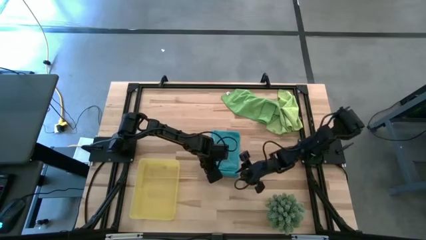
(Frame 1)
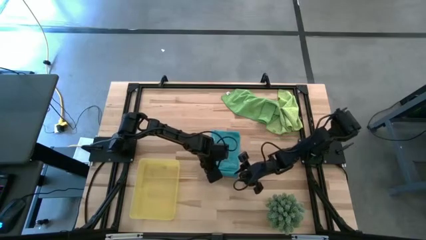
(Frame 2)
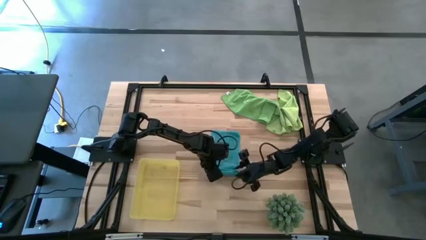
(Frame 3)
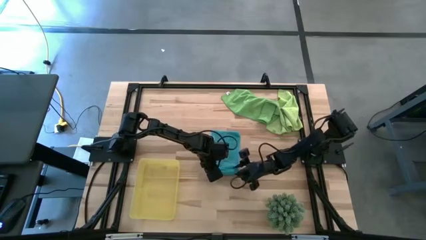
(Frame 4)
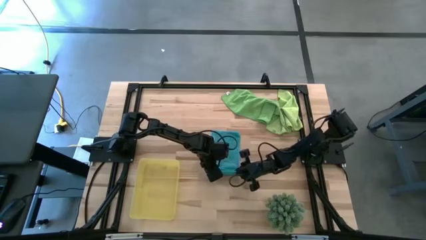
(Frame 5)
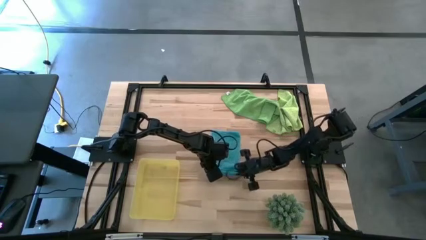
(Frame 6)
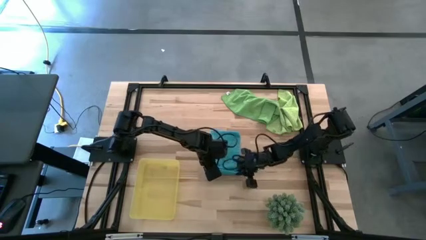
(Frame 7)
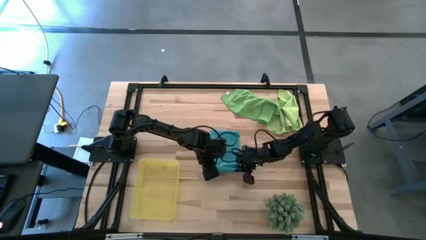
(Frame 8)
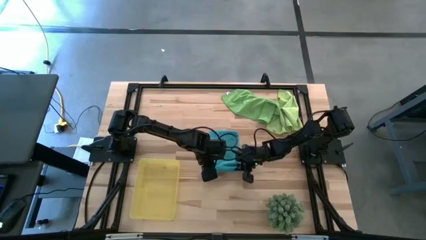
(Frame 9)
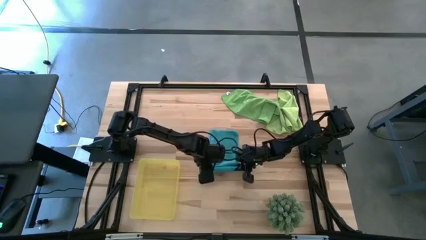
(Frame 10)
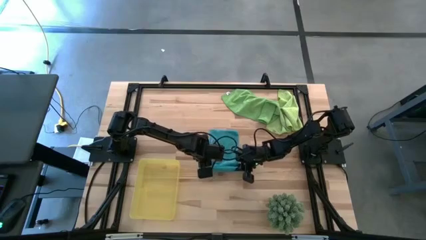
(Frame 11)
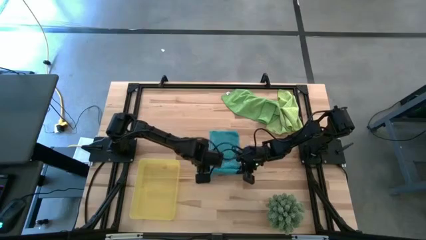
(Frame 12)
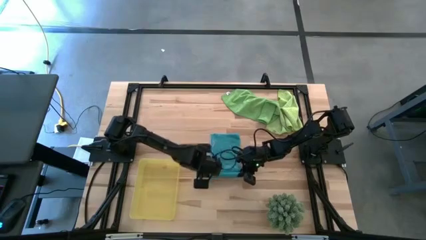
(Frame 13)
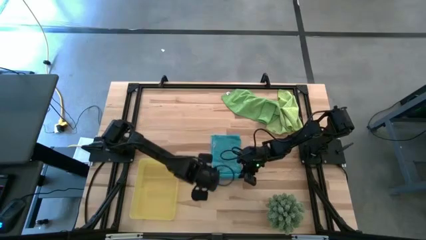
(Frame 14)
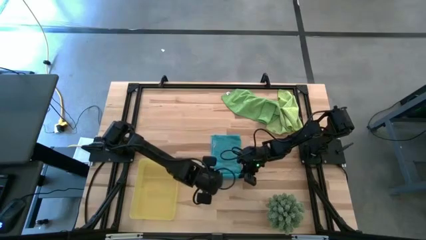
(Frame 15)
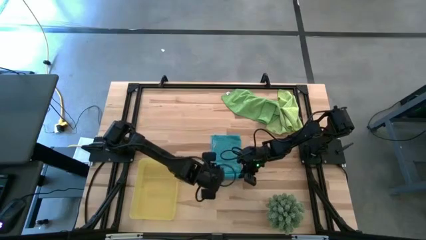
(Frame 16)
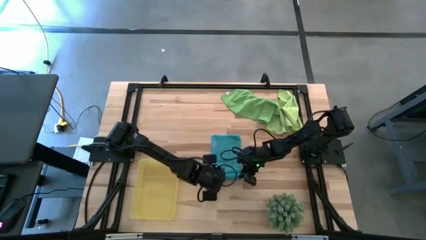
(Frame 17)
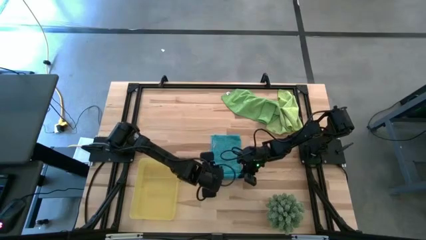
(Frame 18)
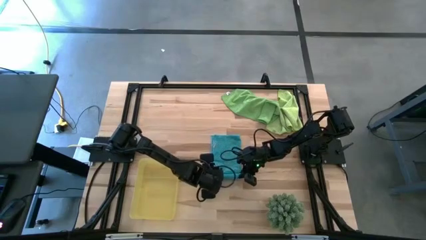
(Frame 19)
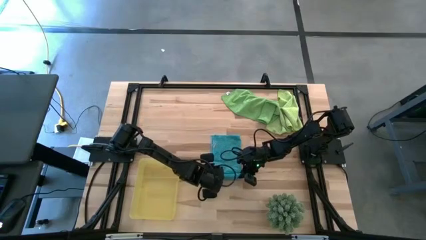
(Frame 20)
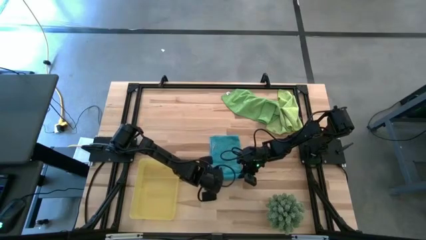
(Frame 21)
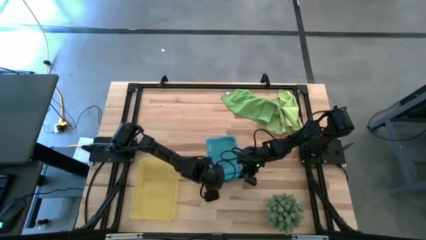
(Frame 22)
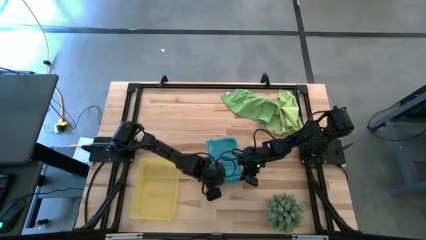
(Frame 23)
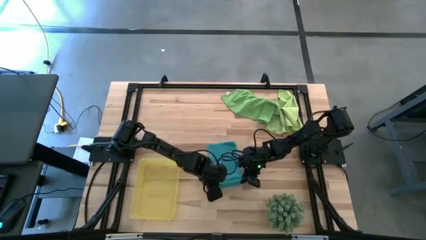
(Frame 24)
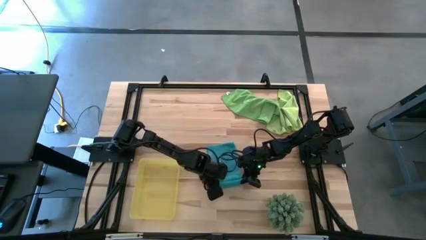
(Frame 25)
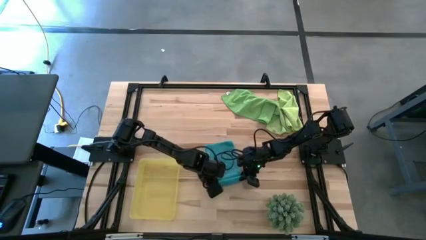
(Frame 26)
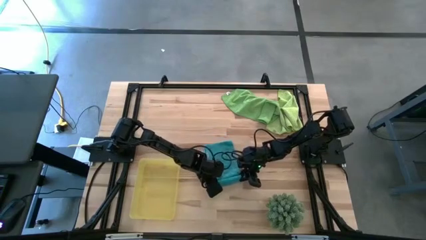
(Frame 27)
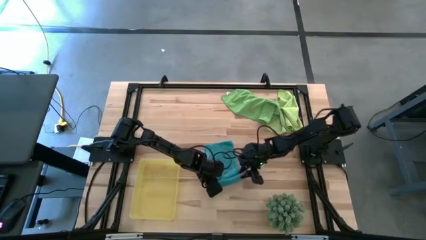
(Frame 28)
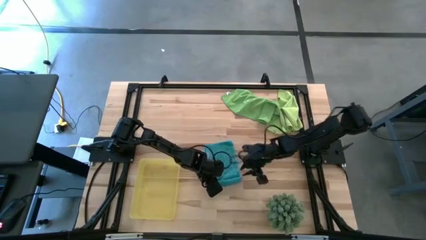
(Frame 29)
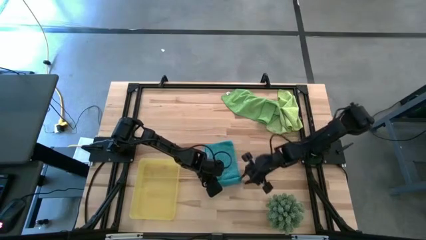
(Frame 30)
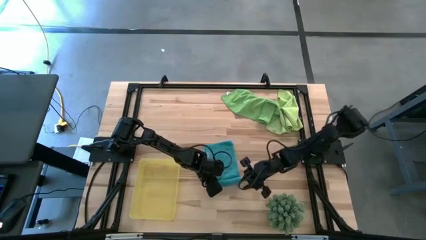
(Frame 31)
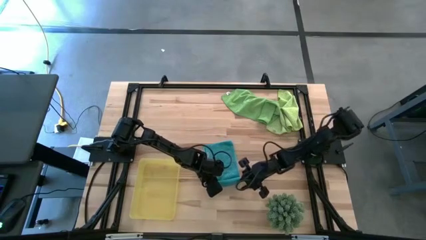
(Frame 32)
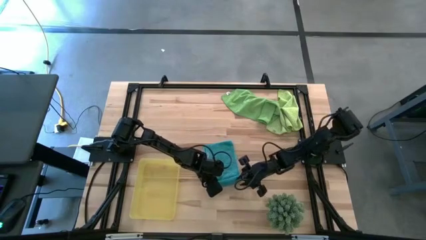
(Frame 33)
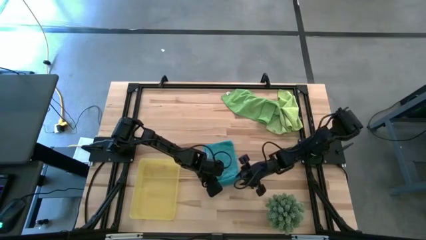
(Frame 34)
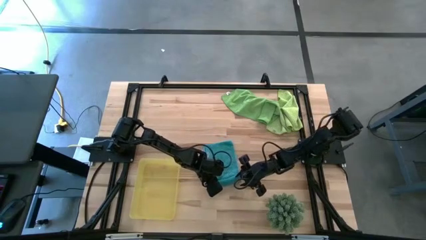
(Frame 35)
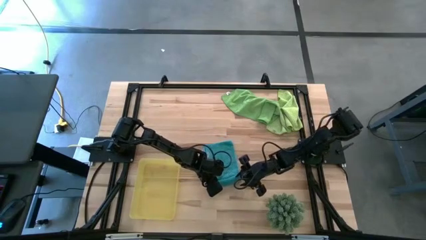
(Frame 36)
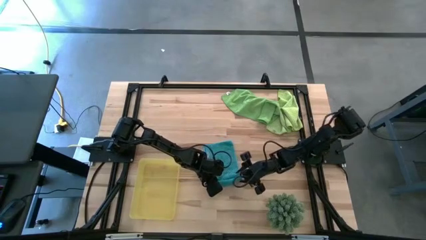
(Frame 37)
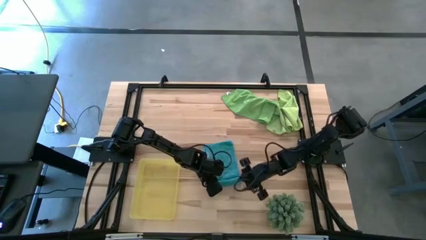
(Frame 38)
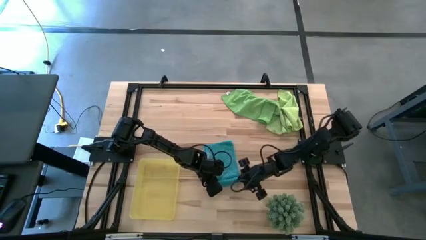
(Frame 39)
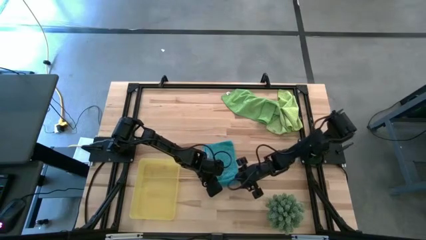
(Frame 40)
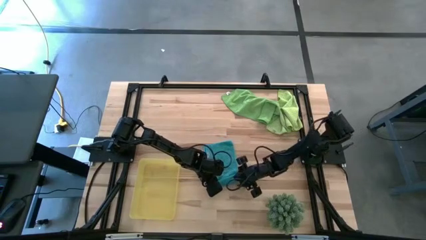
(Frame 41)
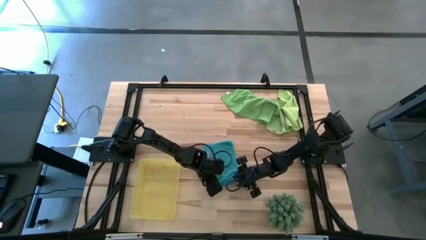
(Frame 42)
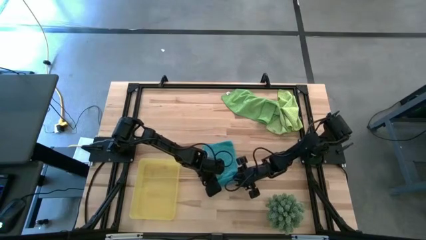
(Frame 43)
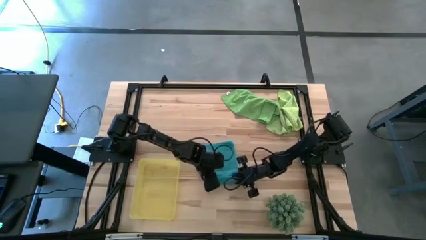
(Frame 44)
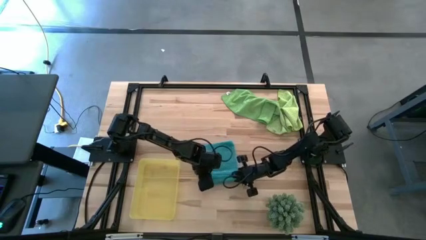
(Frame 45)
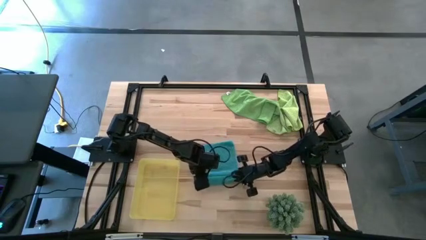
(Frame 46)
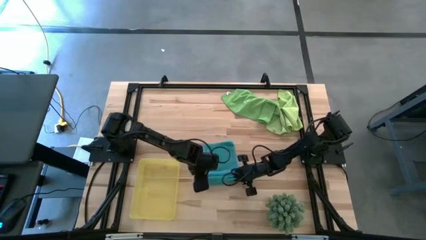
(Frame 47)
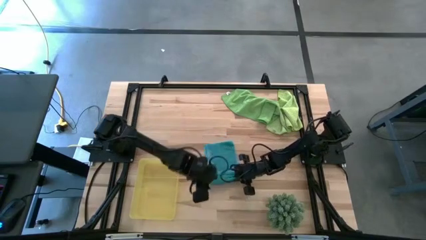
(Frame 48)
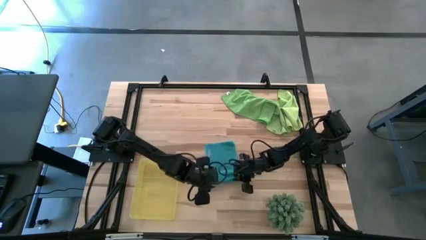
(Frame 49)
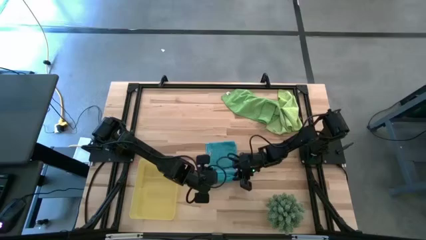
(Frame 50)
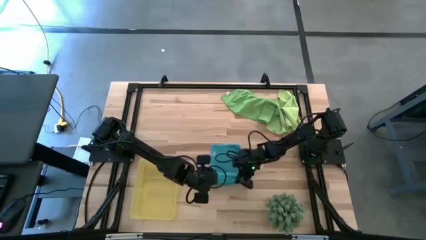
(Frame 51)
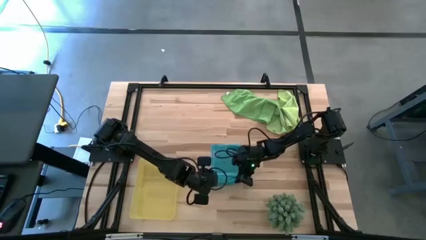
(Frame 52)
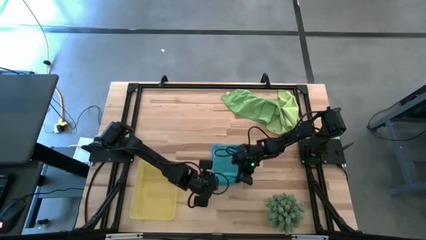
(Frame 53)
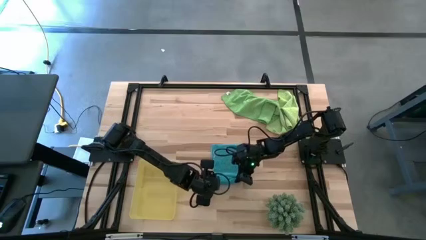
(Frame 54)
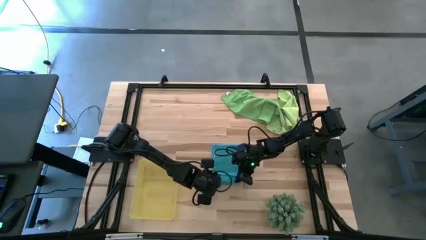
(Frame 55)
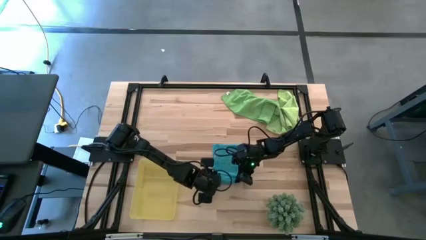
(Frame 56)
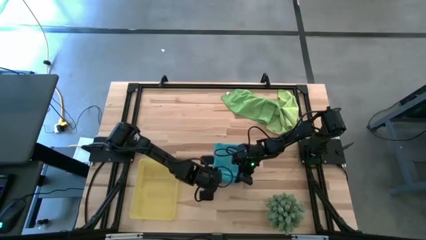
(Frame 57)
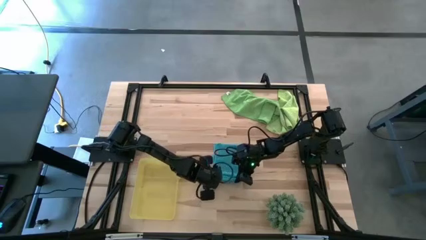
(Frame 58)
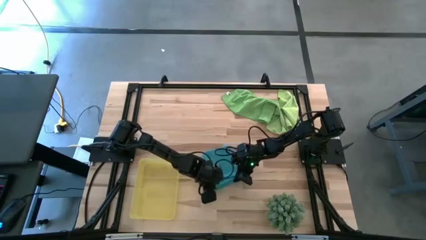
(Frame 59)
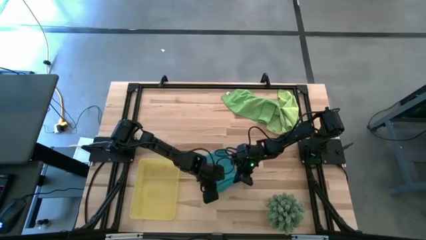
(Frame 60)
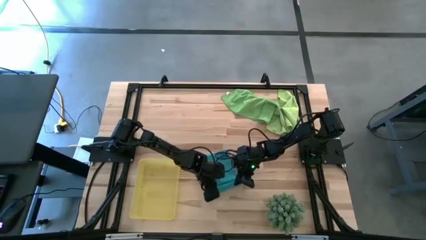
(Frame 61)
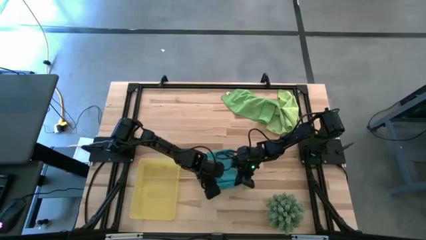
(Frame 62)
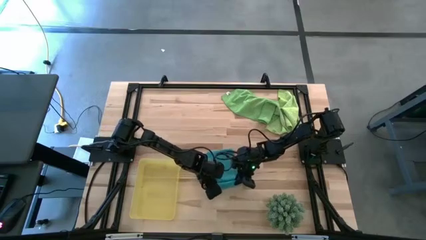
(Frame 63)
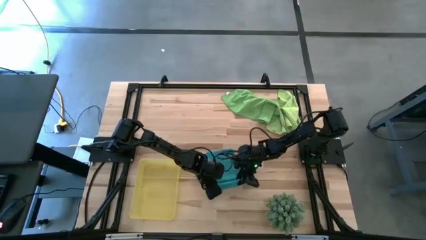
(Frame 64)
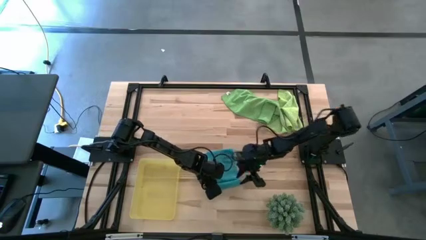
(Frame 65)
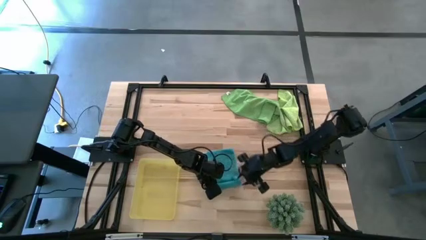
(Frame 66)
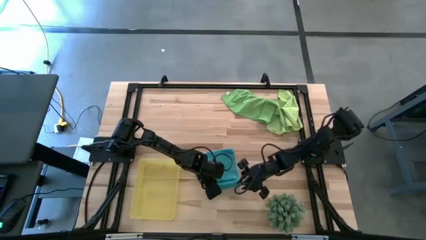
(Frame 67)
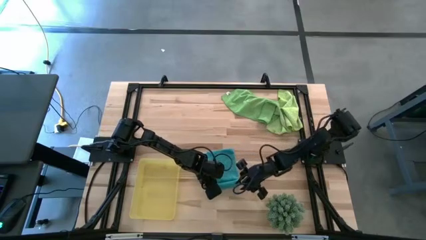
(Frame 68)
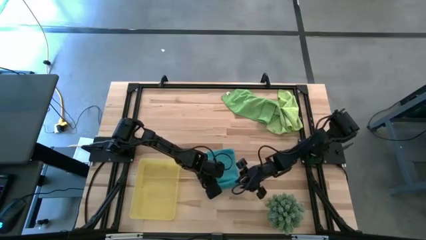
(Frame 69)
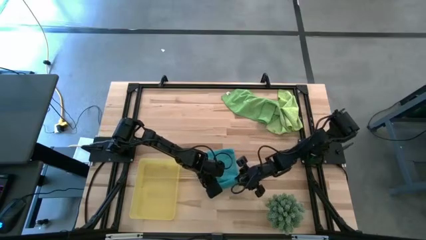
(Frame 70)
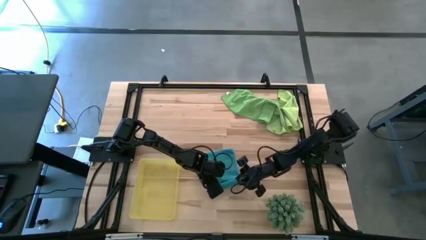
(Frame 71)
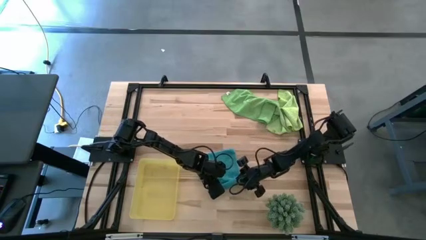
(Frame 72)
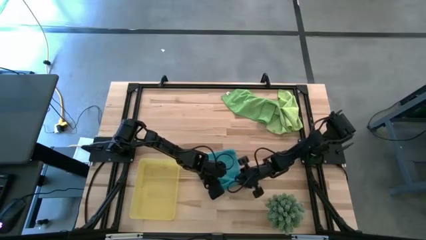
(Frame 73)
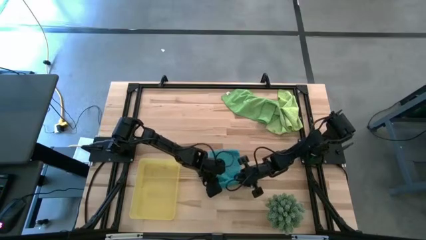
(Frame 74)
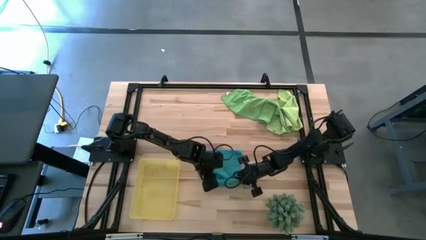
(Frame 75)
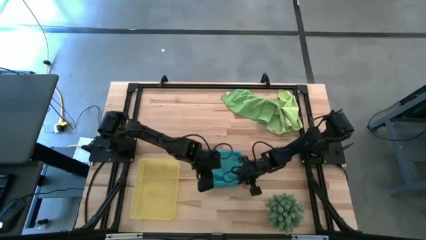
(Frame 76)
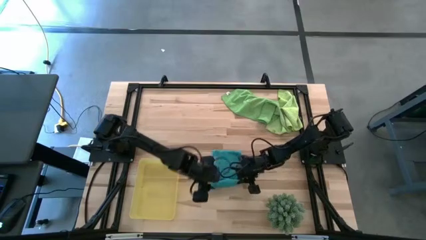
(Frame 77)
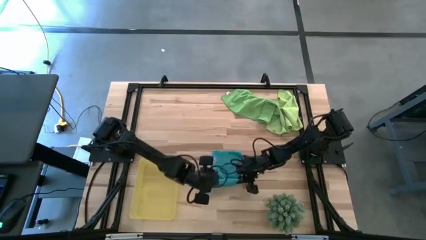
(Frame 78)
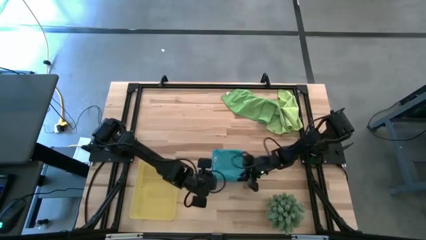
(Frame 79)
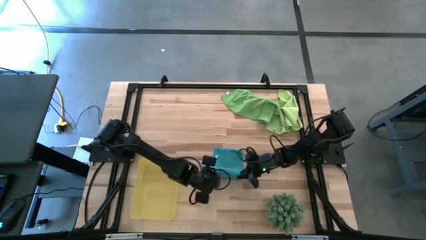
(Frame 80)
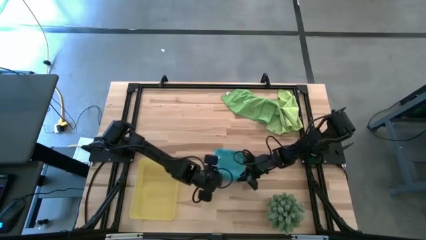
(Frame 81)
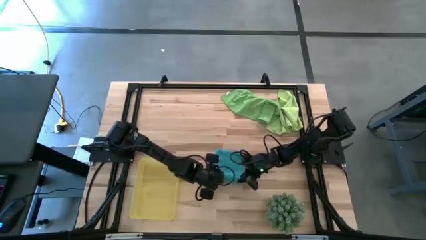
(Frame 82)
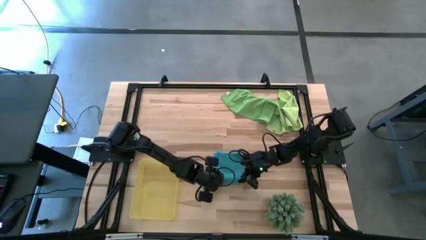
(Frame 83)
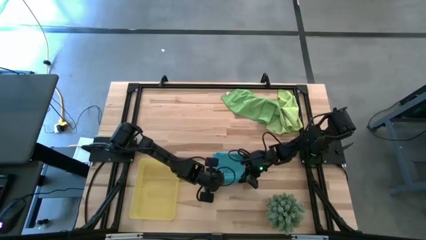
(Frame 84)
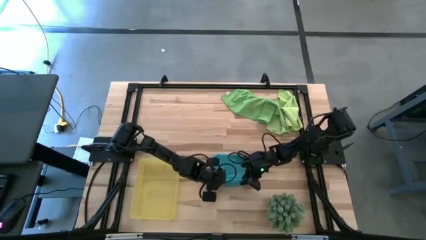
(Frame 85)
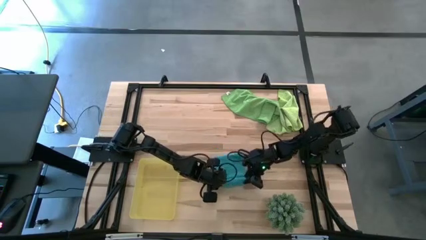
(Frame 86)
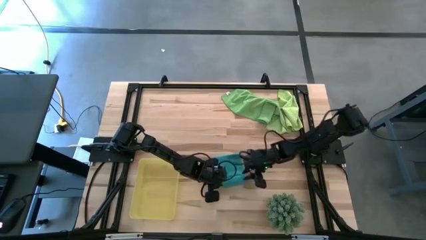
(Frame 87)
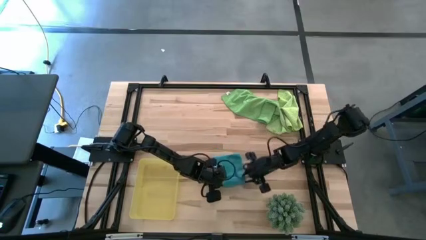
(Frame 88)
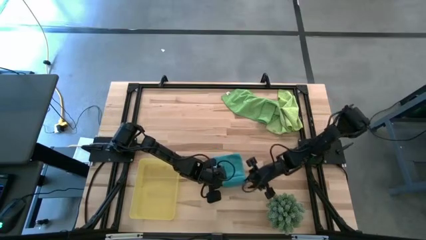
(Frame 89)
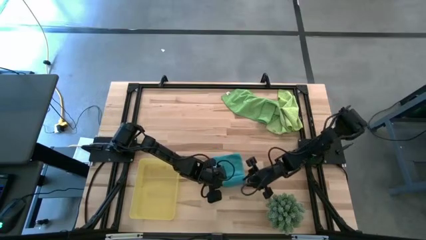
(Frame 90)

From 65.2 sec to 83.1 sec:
Task: Roll microfiber towels into tight, uniform cylinder then place into a basket
Roll the blue microfiber towel
